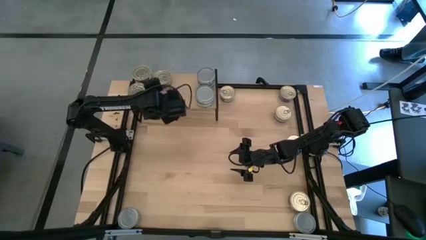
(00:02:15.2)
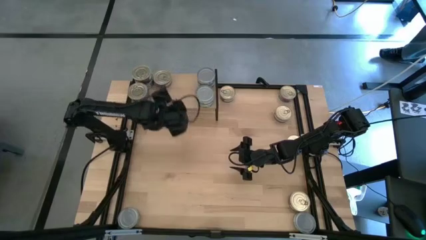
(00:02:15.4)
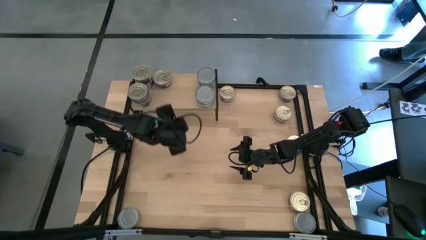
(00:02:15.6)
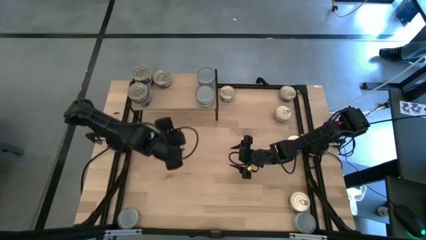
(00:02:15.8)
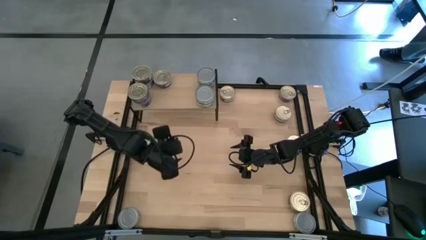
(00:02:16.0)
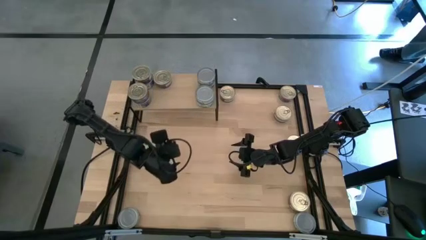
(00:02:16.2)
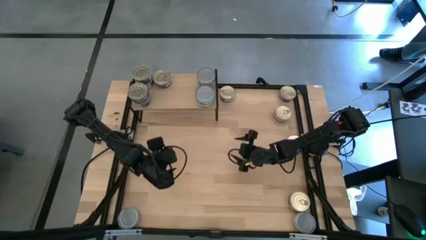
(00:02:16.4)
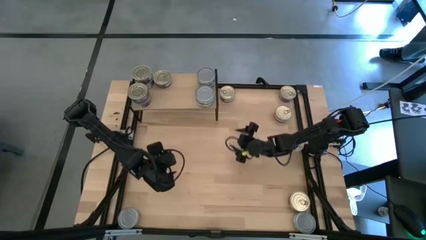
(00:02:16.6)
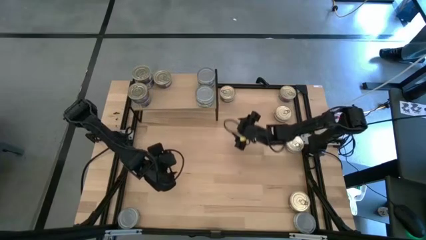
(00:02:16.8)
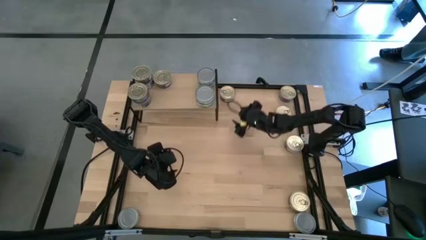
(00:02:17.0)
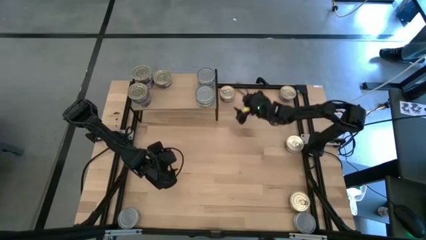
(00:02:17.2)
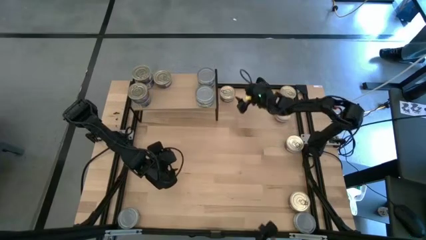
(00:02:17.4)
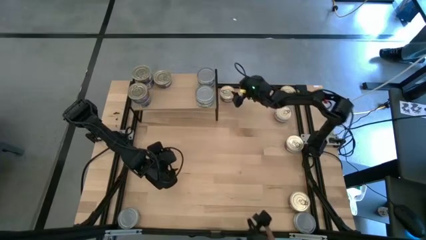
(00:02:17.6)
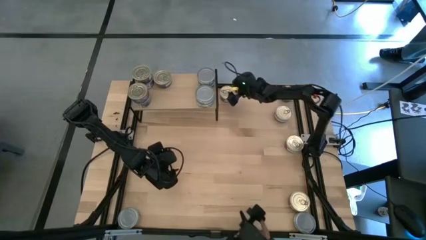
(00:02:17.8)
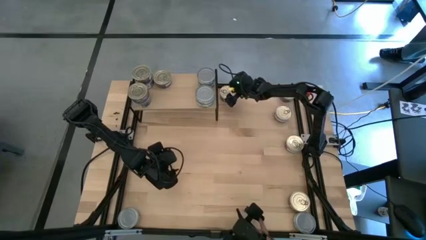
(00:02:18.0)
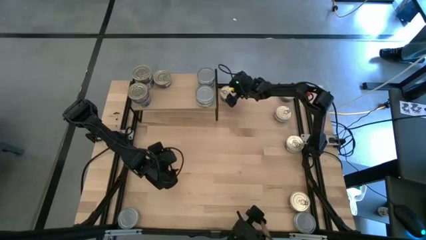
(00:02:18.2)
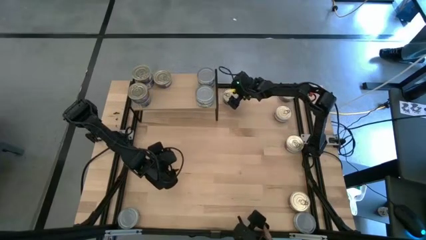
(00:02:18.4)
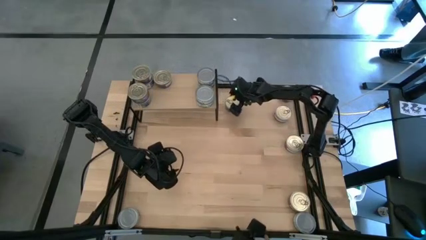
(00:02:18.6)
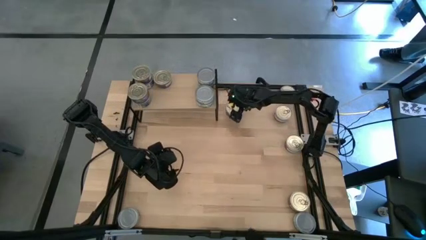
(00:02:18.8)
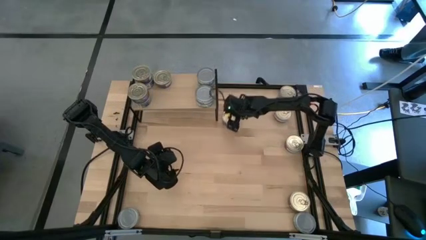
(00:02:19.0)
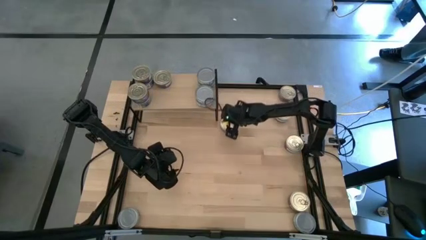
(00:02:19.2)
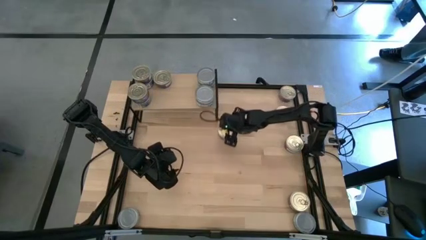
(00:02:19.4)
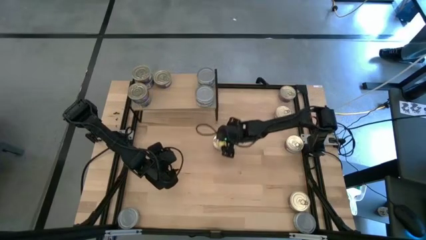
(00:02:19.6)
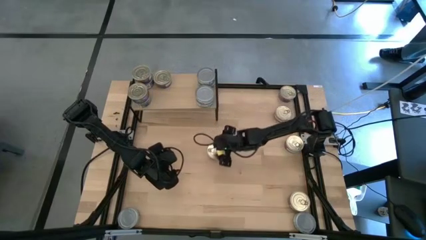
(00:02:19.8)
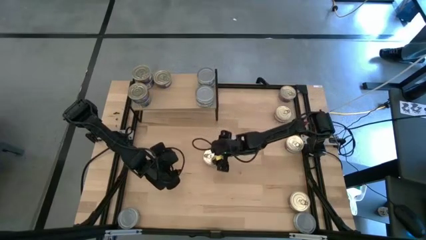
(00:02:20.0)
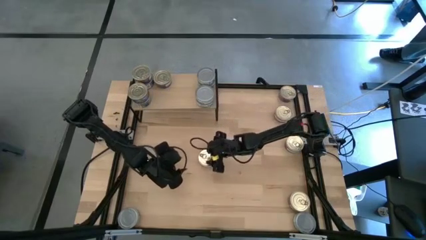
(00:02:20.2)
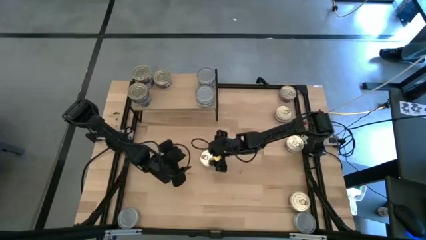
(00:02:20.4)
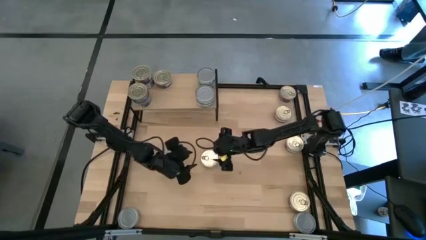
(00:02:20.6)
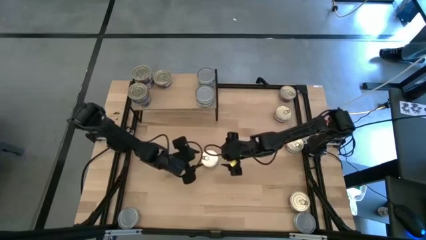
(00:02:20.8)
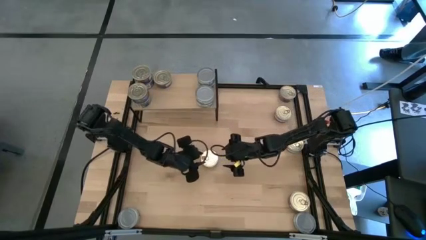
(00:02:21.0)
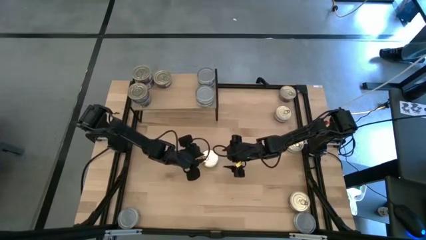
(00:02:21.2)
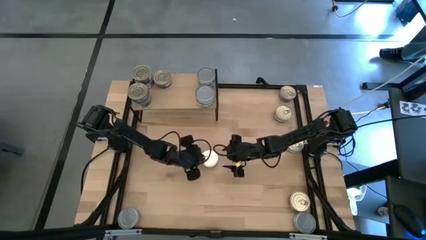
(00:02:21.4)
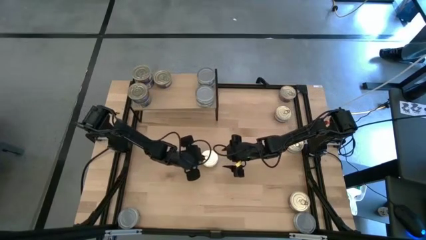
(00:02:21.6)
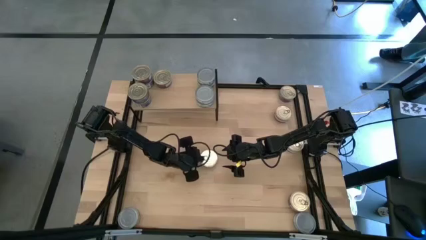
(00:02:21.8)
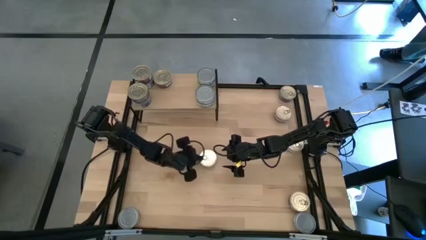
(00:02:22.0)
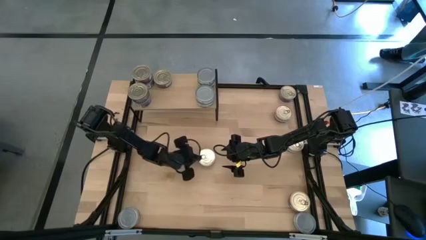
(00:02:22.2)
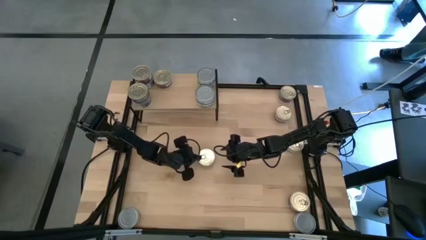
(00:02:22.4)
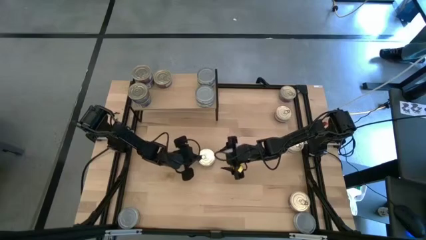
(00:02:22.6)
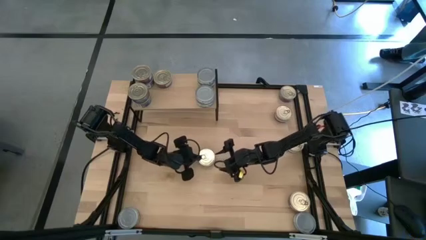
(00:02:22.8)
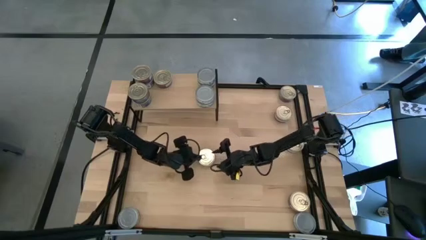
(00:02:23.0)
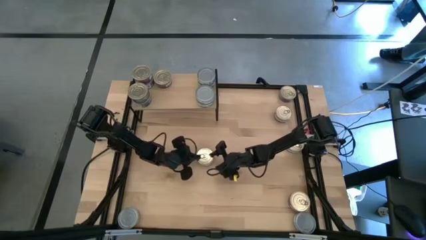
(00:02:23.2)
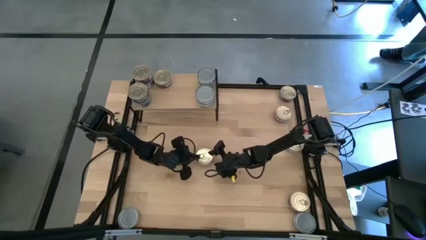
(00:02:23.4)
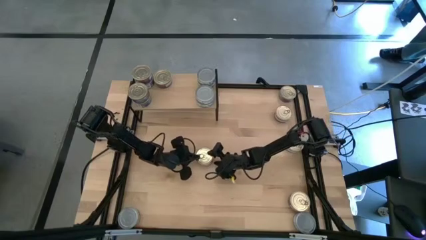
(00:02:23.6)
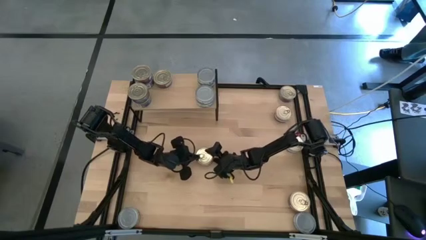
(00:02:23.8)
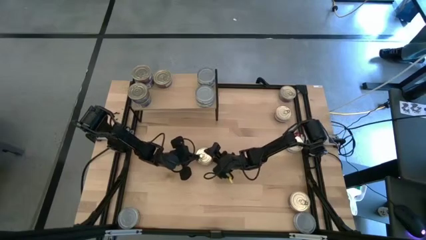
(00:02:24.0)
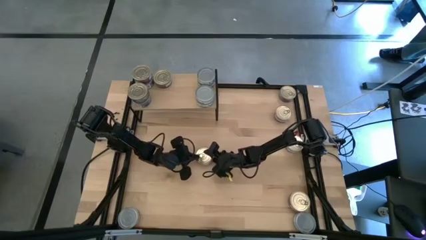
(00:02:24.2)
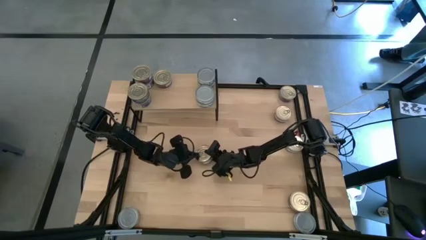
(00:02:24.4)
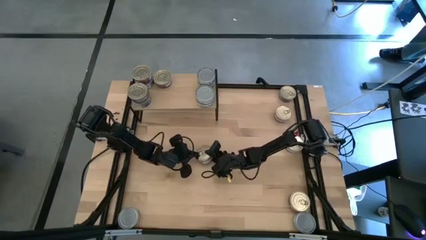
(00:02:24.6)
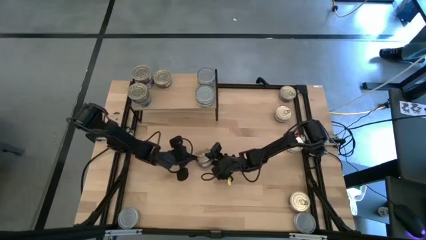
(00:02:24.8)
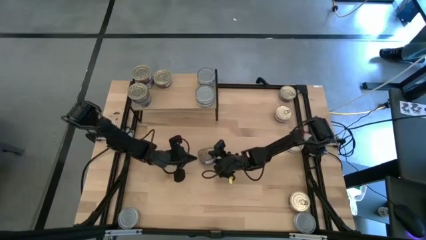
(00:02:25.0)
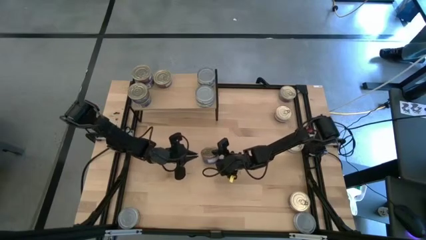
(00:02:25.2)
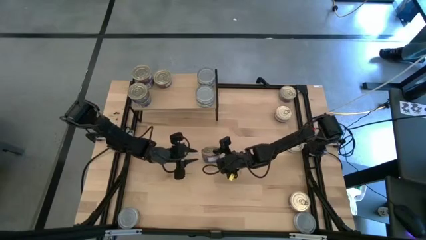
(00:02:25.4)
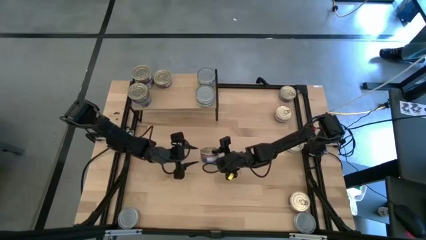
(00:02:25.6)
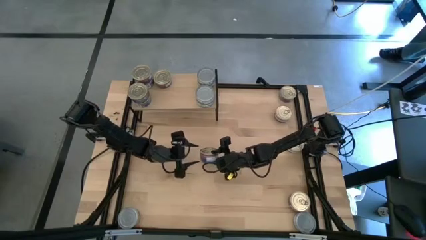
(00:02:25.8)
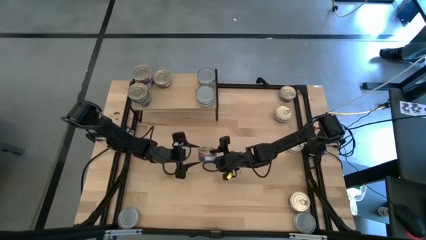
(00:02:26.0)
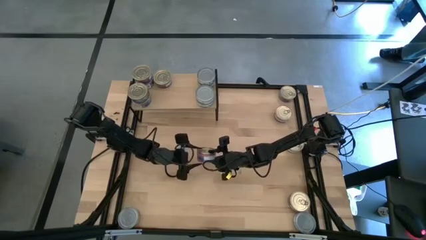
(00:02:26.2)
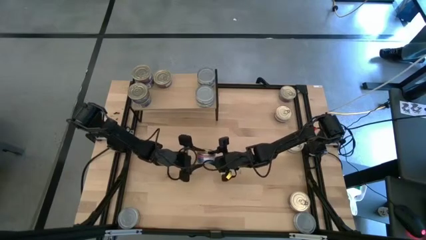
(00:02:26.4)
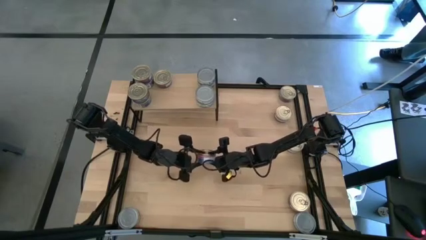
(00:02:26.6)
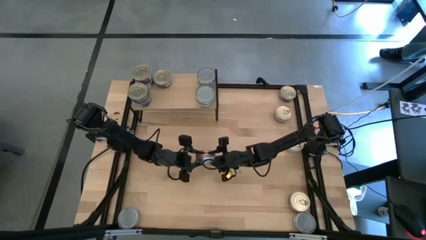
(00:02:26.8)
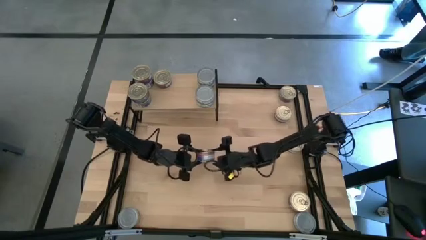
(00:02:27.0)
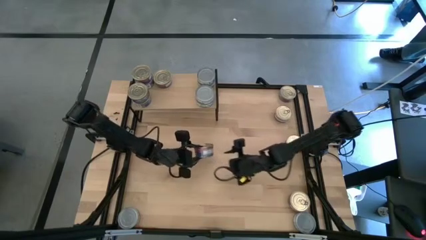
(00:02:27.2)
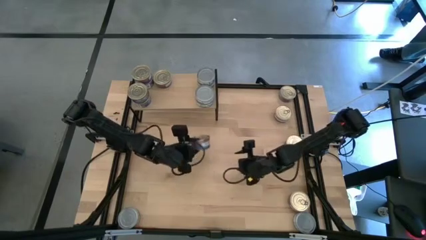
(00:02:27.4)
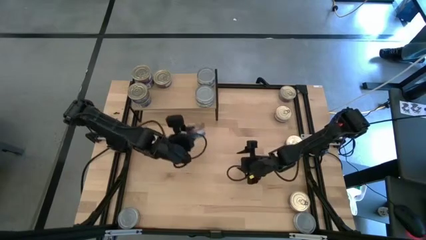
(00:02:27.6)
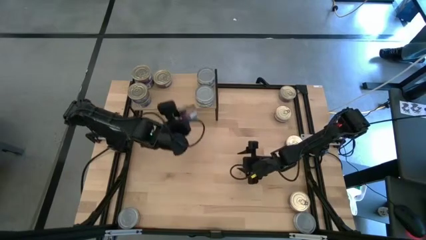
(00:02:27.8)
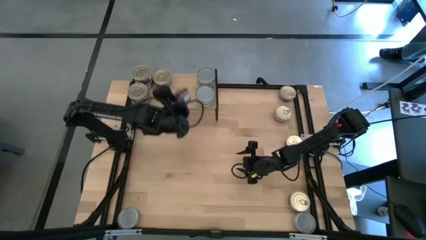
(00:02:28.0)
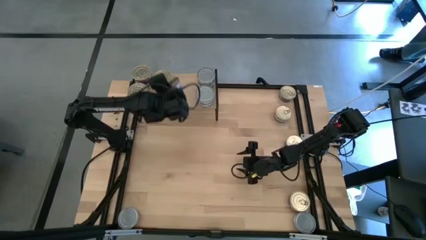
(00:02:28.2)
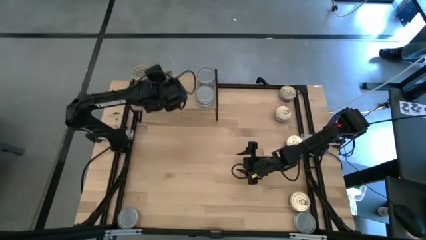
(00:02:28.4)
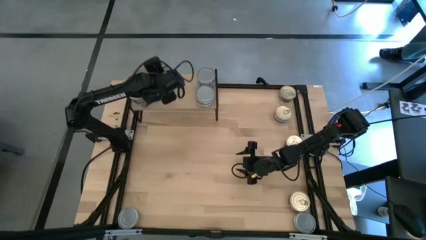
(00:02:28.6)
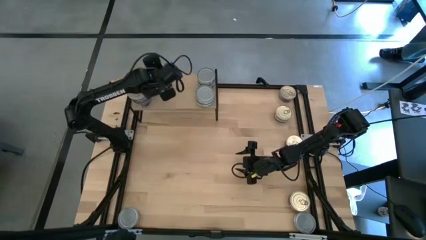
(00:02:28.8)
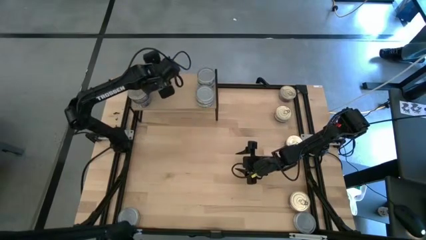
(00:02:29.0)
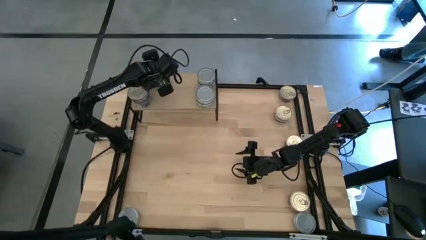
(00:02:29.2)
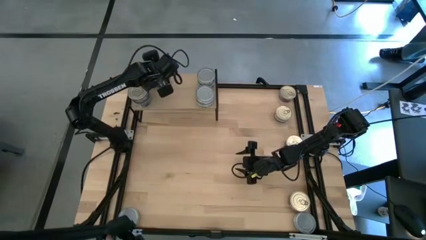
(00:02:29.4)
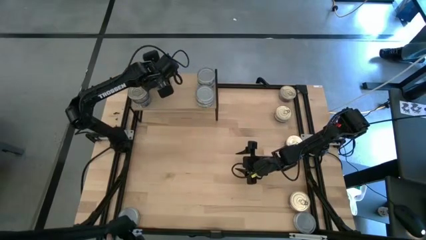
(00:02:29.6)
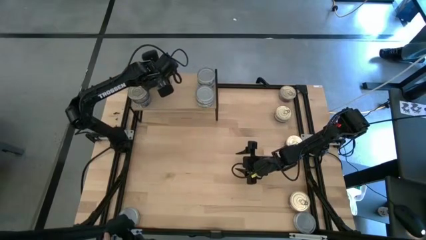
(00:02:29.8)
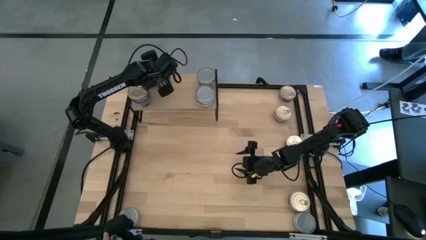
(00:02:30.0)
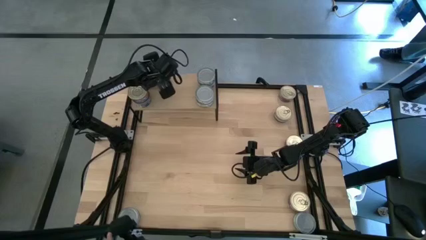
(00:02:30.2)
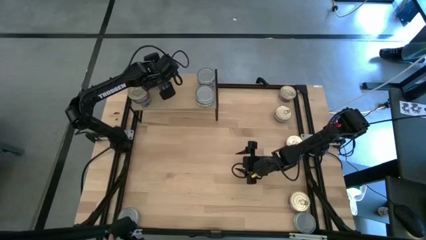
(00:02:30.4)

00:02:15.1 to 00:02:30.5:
Task: Stack canned seafood by type on shelf
Stack the blue tuna can on top of the blue tuna can on the shelf
